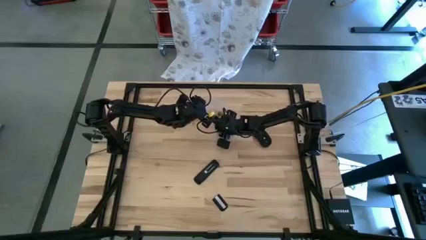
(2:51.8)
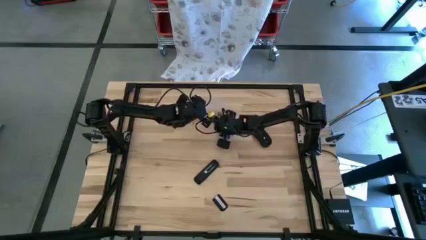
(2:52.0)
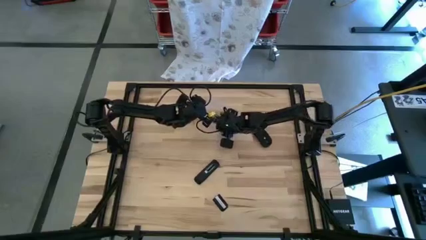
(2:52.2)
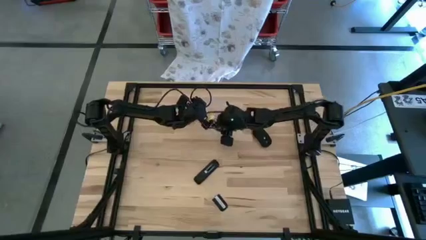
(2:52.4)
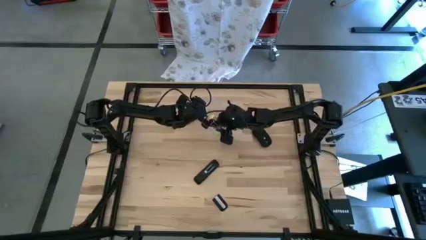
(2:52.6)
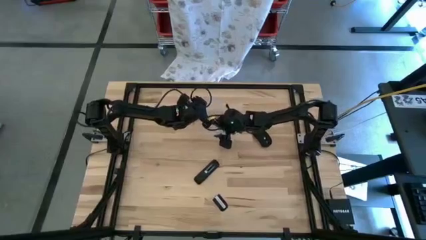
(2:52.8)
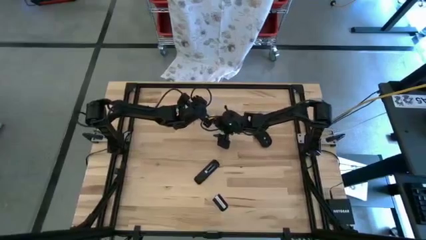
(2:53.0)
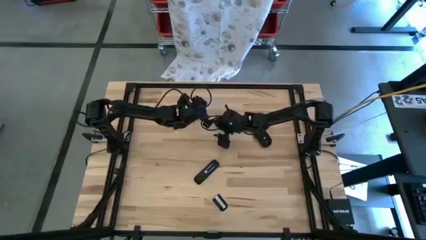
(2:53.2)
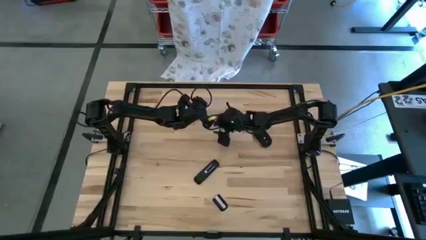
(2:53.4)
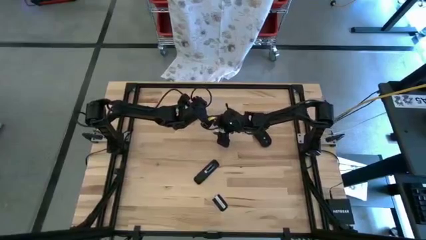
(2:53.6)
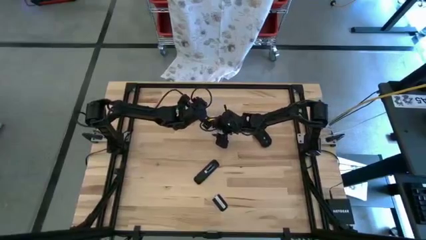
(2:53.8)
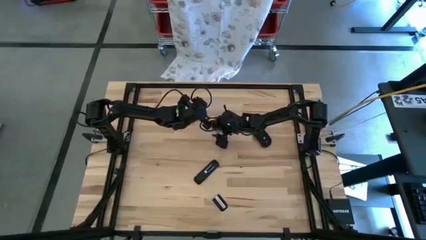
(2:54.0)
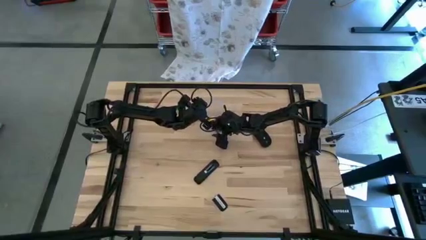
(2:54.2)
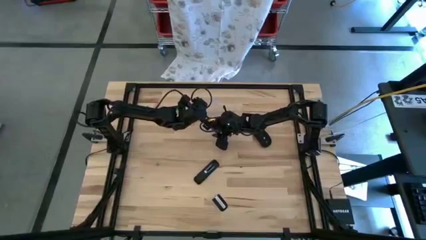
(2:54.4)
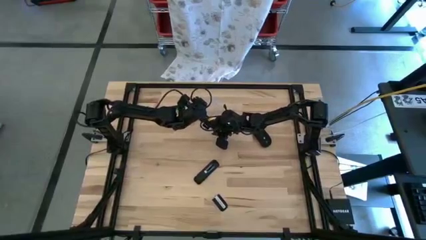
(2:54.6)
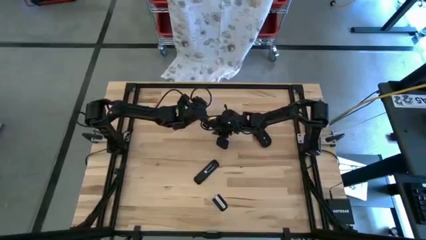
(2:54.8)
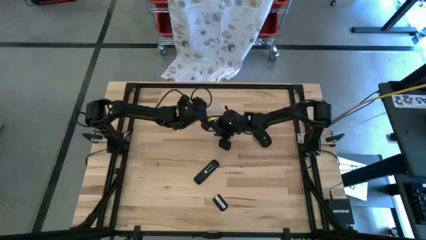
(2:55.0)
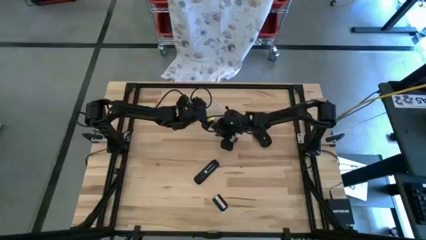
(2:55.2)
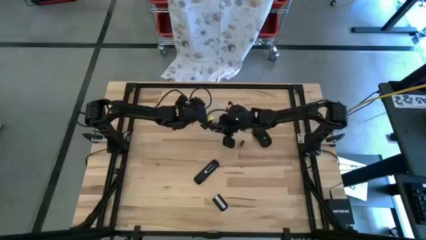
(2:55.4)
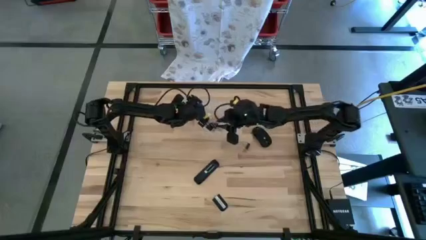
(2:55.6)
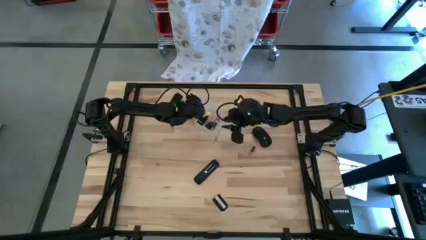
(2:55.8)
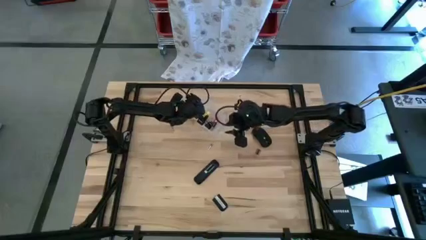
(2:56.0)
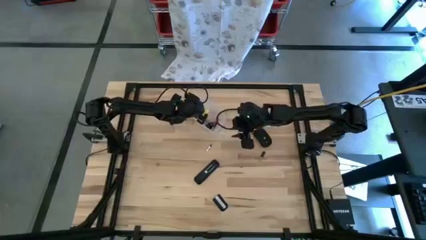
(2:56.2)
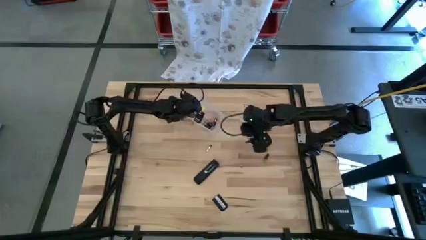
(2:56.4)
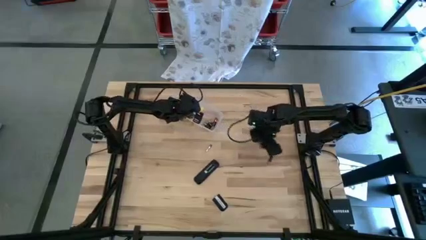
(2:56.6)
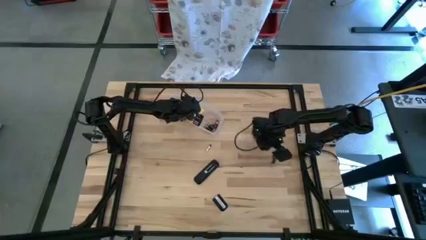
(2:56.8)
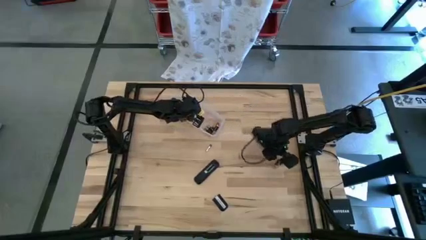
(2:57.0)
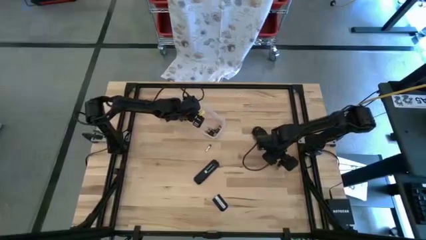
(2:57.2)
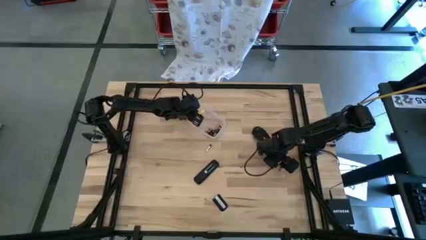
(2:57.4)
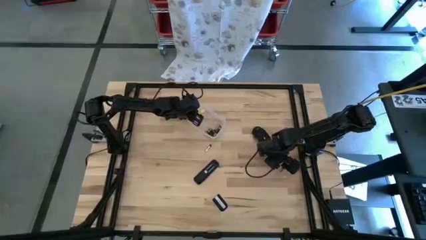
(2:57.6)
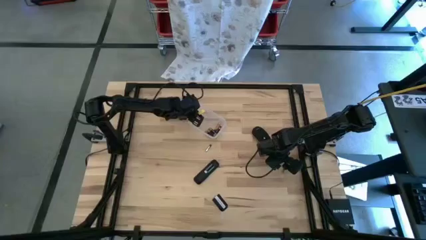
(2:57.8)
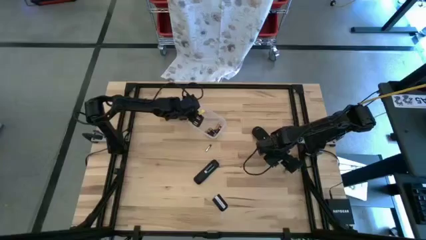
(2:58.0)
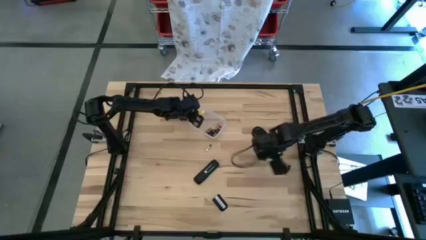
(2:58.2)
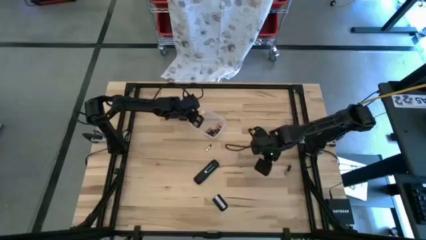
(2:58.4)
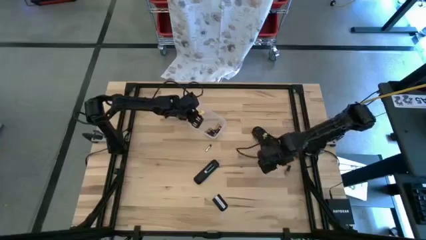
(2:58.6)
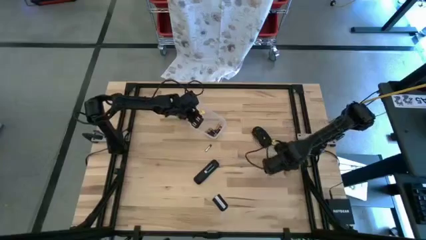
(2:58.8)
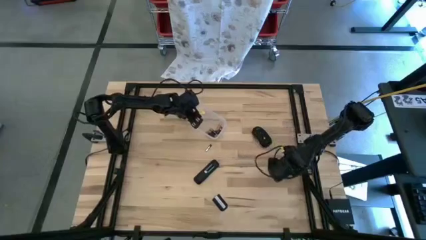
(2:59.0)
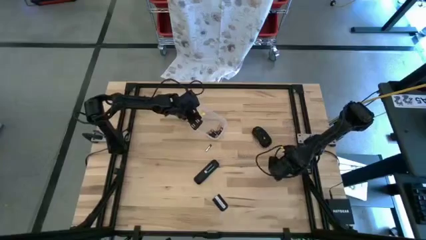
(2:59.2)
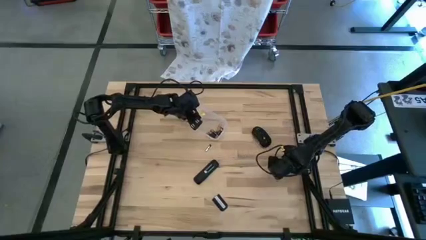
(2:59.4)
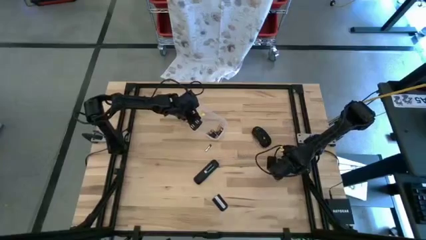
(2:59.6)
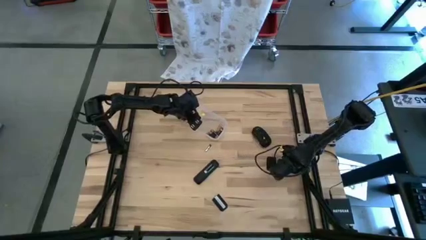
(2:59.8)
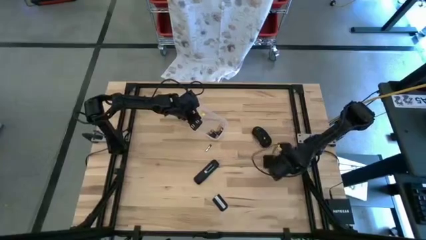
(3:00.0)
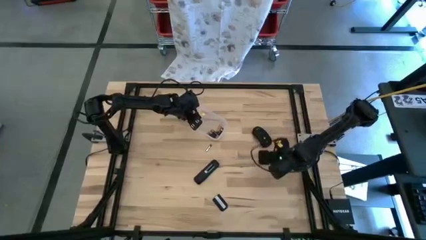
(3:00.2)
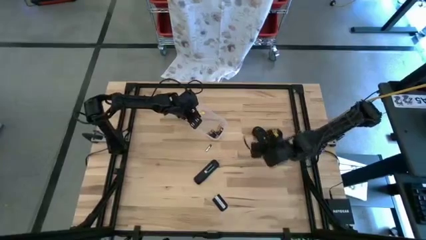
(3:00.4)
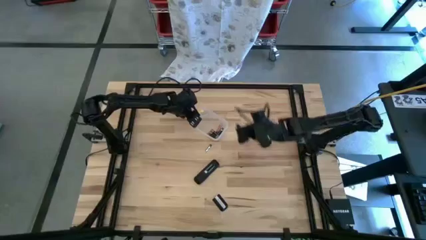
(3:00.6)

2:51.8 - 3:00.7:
Task: Insert battery
Remove the silver battery from the transparent bin

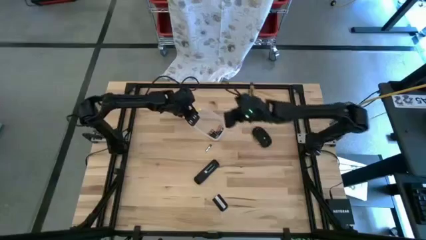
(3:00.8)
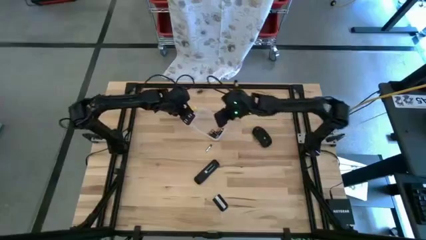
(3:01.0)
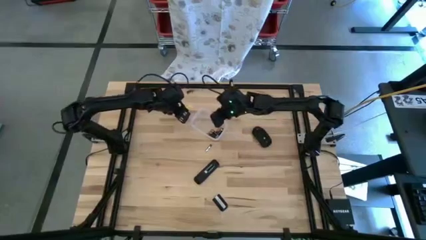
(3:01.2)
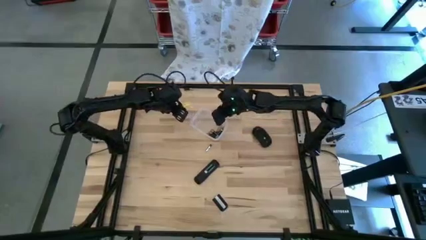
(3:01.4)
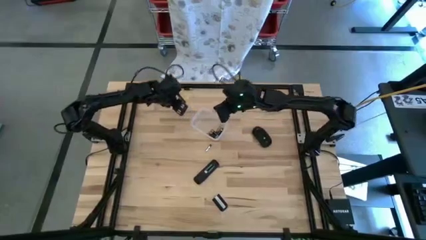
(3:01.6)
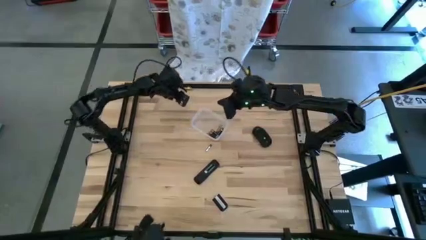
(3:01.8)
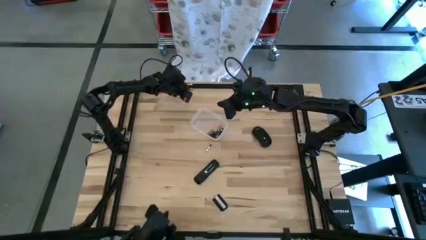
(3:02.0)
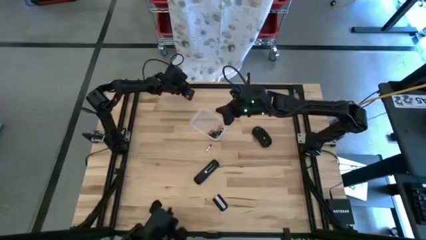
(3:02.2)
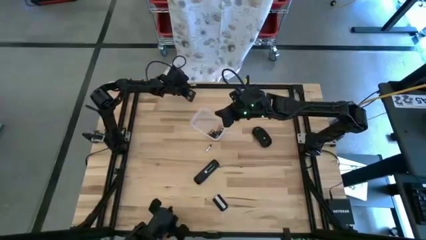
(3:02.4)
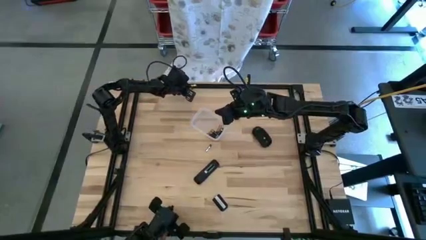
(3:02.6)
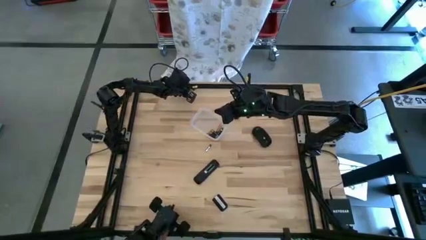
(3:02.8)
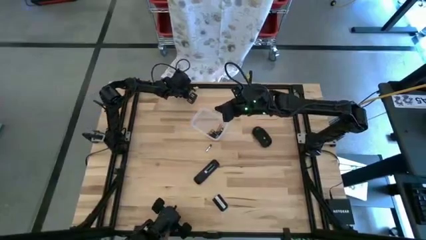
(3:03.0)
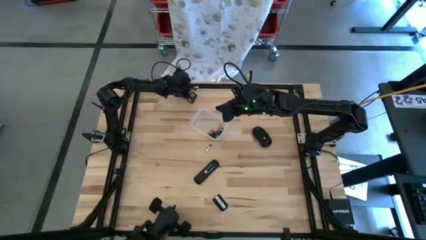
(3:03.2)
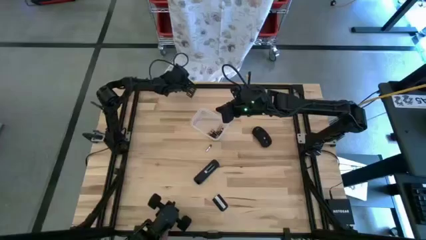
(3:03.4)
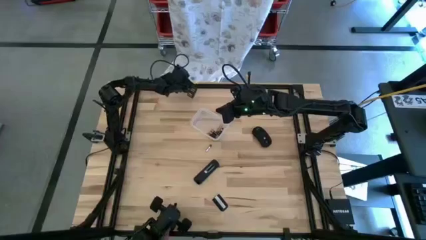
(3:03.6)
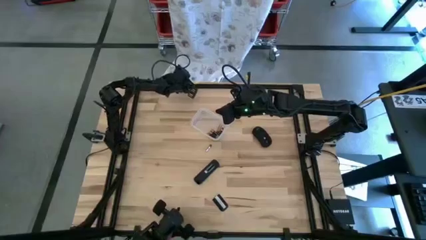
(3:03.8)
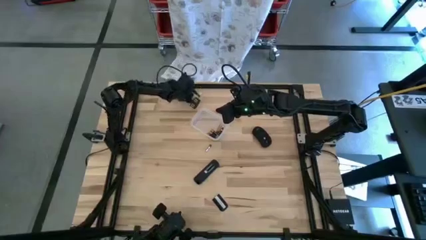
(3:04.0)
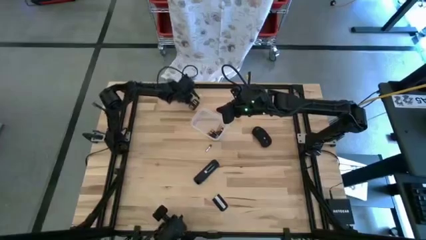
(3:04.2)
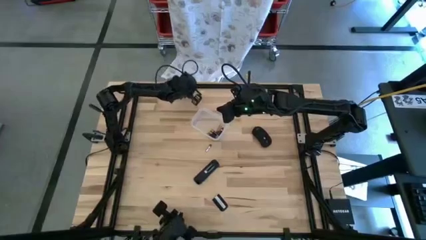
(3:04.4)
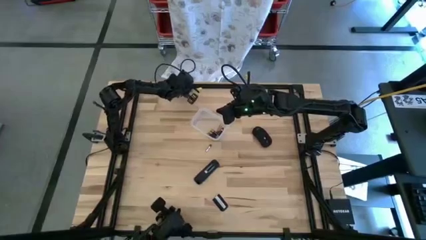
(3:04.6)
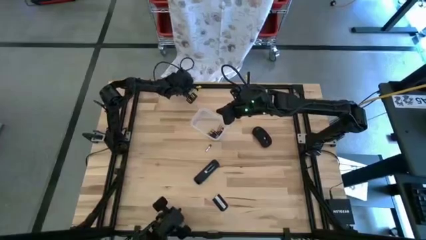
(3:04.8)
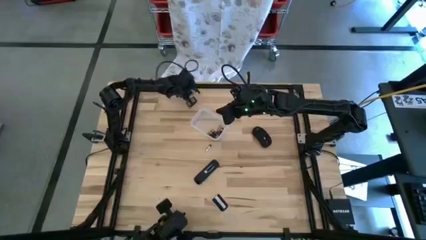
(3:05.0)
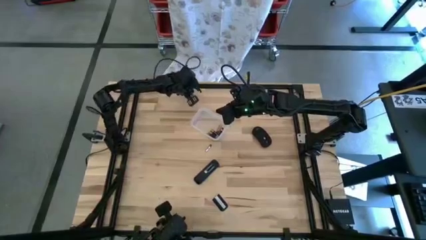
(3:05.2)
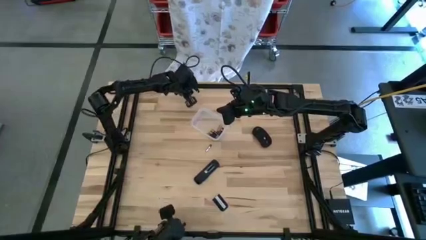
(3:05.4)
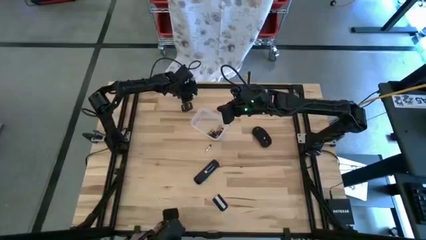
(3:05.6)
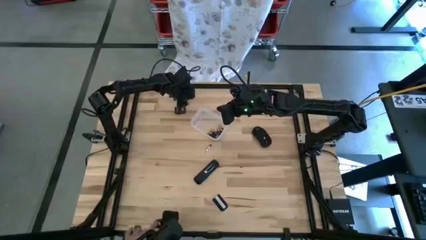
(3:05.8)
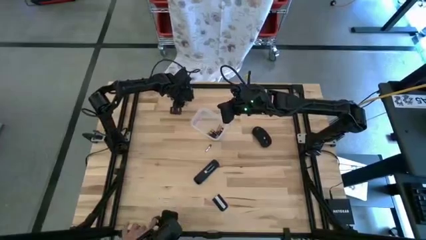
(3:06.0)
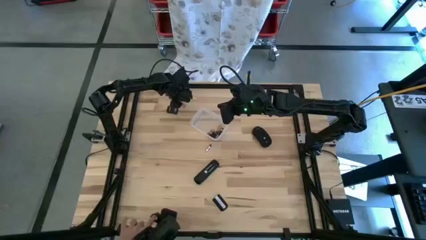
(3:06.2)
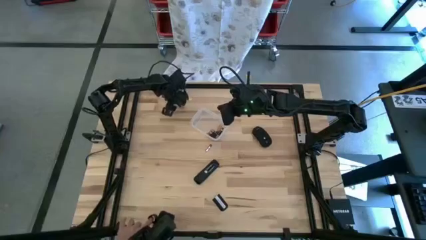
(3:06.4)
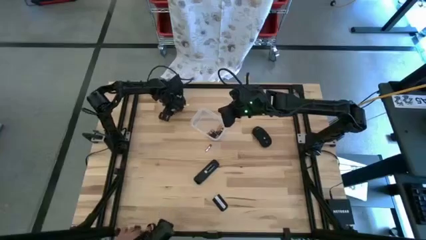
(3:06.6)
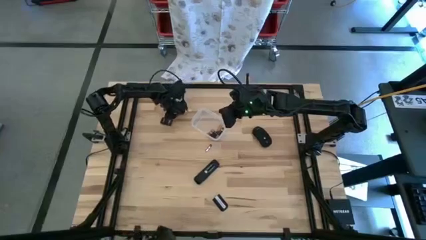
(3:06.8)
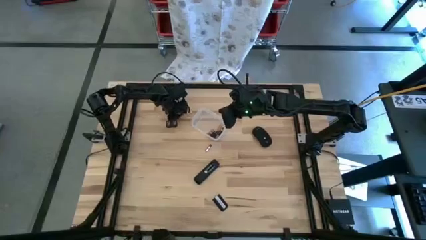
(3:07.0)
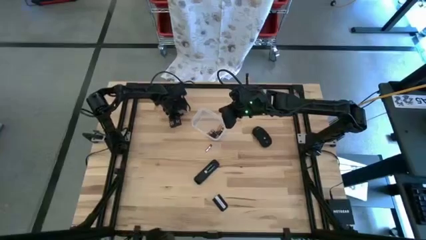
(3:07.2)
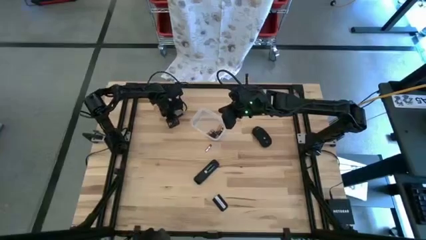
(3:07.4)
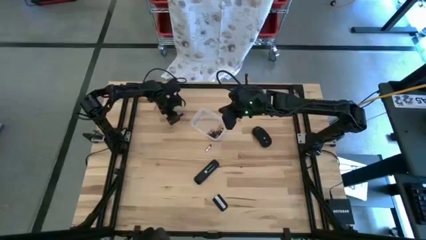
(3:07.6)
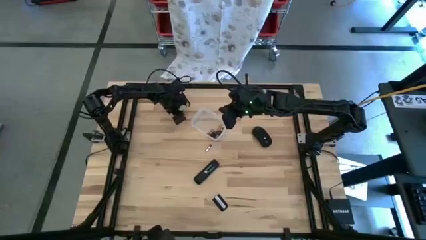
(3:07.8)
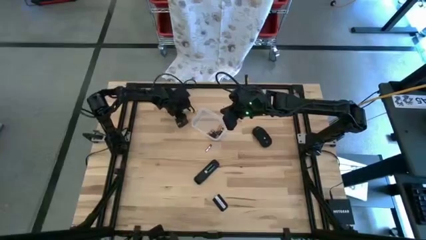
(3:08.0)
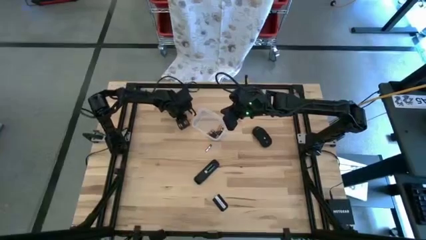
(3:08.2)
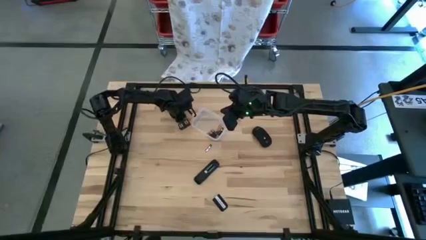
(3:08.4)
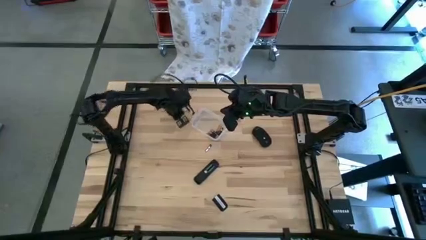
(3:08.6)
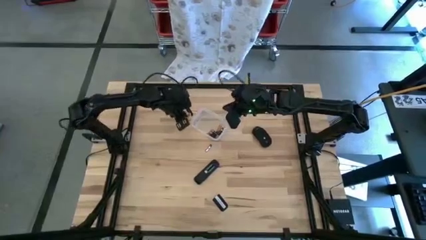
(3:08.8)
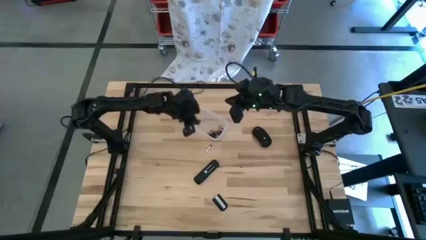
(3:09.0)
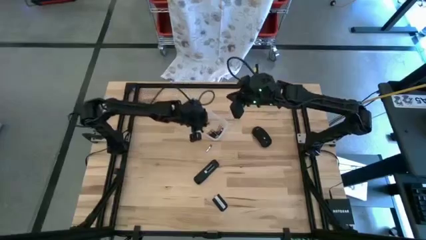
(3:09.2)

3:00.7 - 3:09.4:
Put the brown battery into the transparent bin
